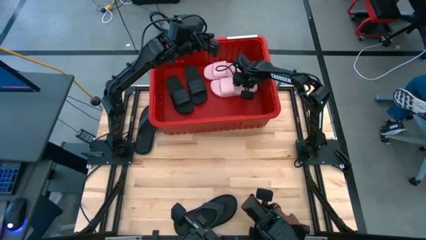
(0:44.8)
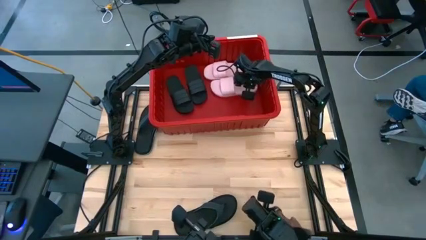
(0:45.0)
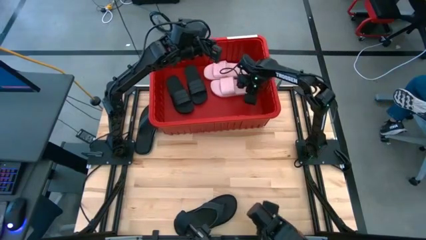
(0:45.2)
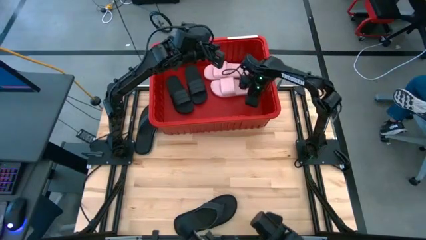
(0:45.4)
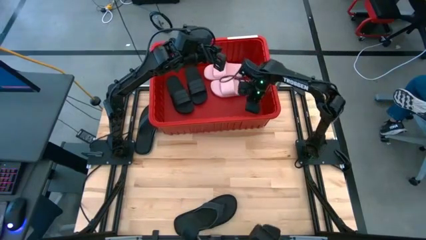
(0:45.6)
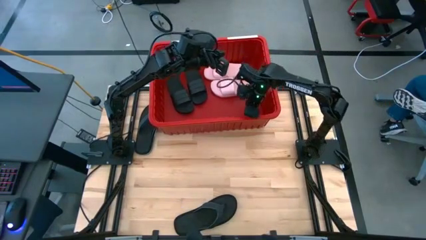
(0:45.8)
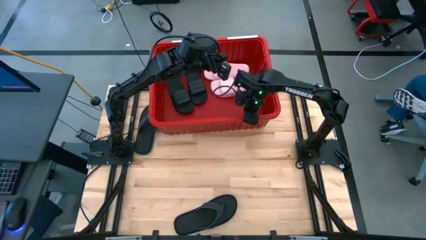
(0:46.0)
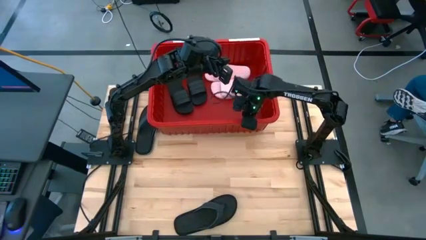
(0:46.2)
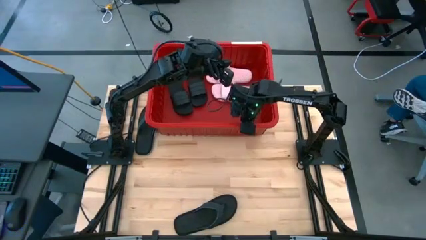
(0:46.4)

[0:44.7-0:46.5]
Task: Pick and place slides into bin
Adjust the red bin

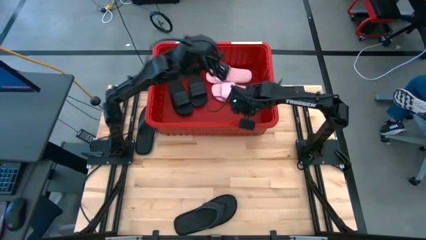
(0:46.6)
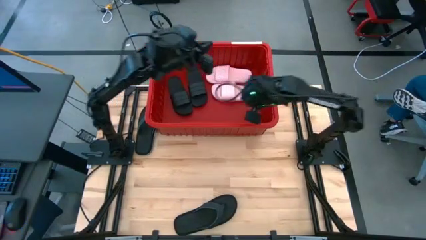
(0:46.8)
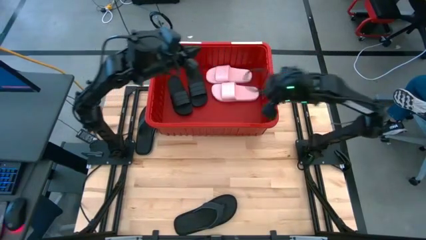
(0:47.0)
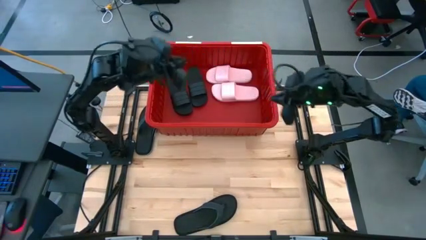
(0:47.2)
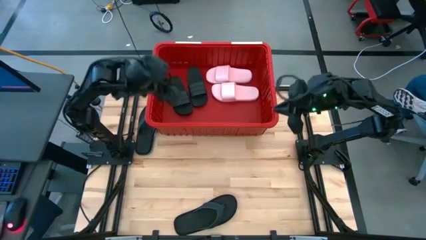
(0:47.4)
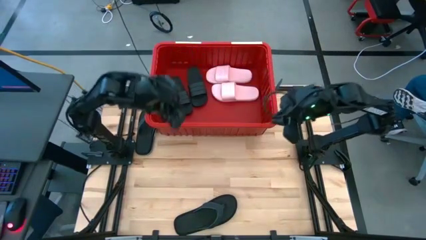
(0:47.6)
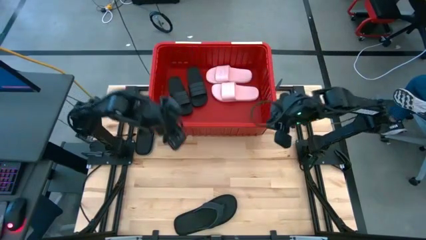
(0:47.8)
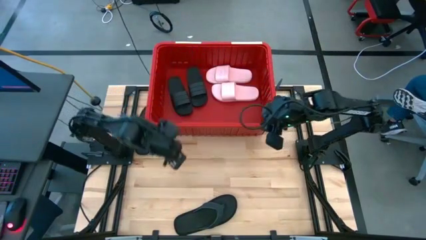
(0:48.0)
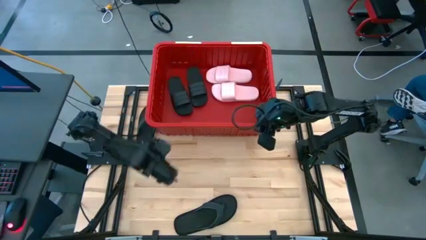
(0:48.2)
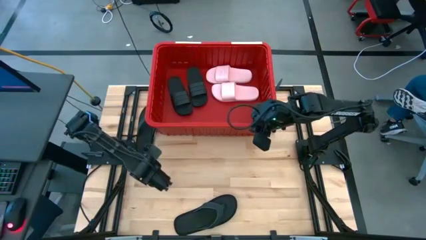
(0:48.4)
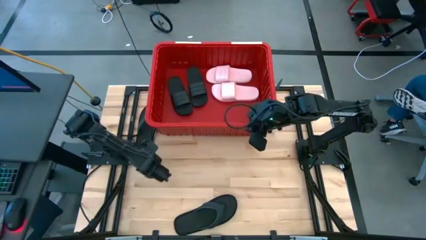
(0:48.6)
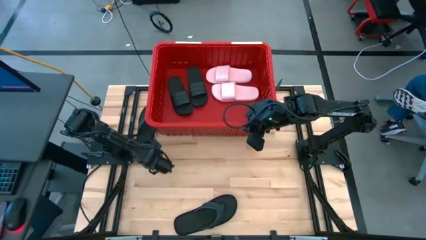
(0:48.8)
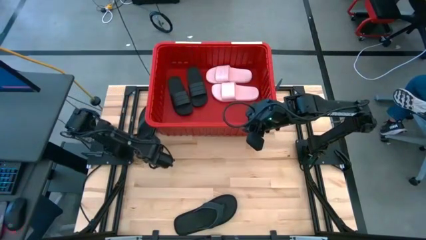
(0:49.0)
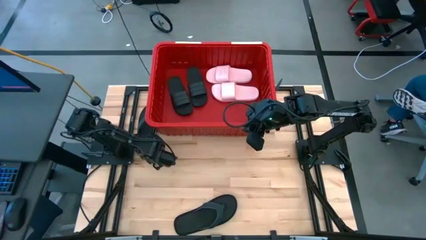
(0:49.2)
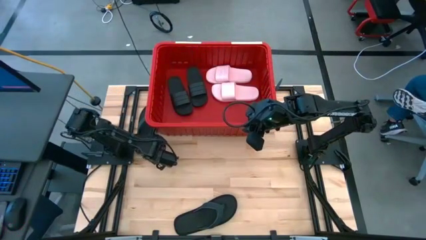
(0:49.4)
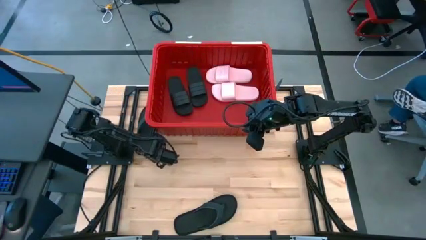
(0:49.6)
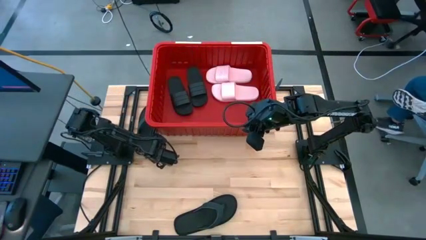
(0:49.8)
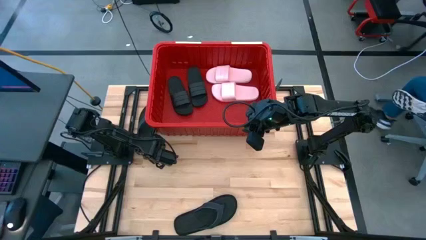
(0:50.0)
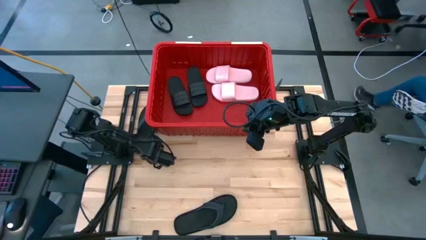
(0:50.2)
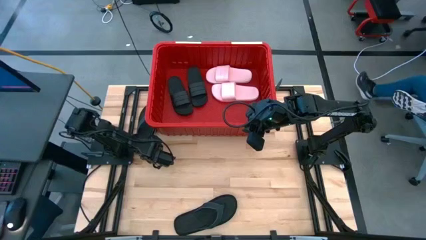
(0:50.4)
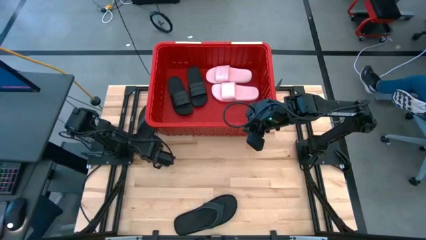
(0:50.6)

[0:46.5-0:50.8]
Put the top black slipper in the red bin

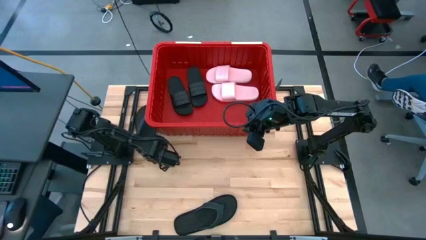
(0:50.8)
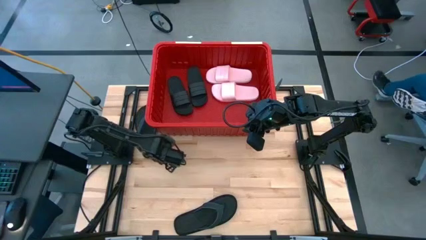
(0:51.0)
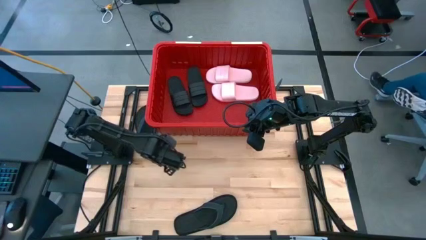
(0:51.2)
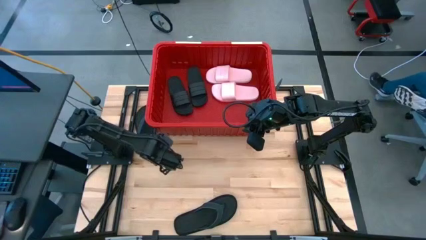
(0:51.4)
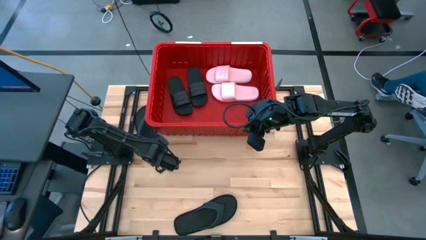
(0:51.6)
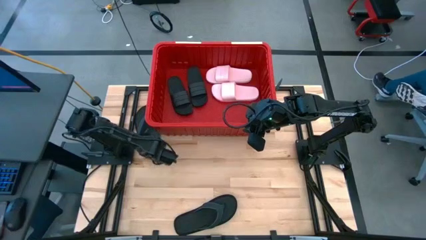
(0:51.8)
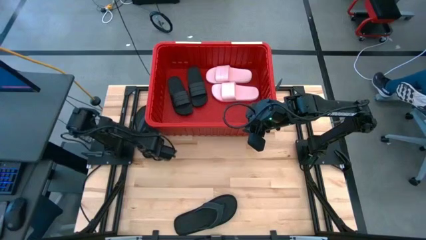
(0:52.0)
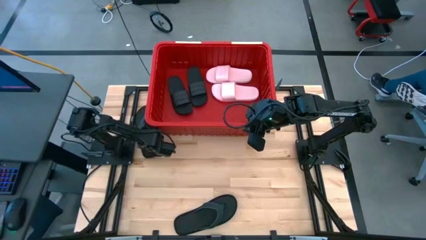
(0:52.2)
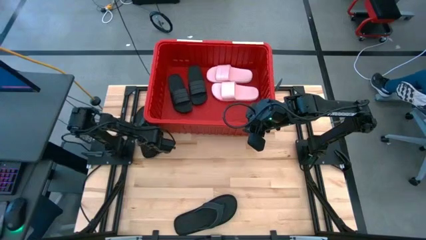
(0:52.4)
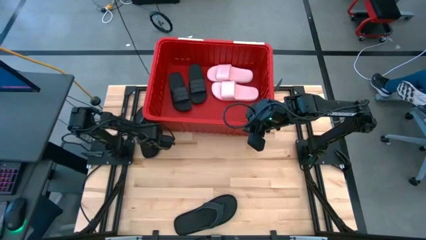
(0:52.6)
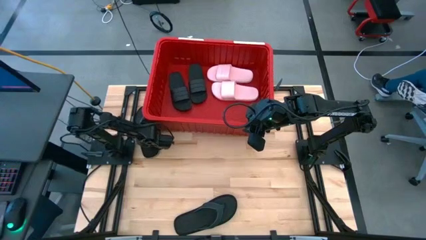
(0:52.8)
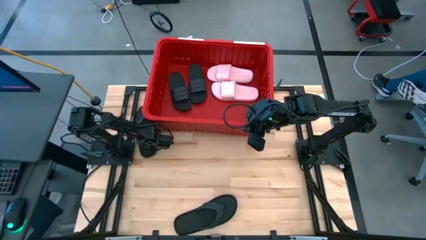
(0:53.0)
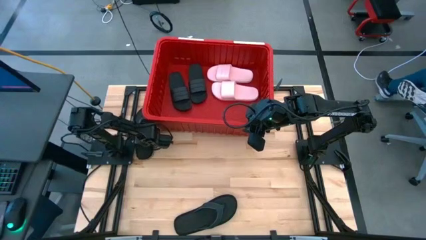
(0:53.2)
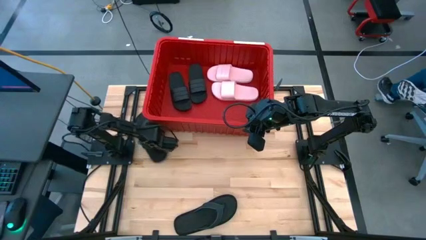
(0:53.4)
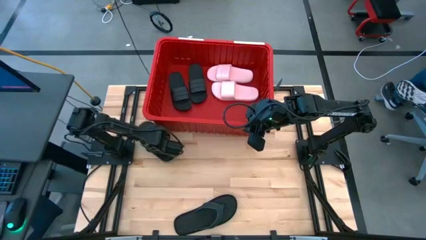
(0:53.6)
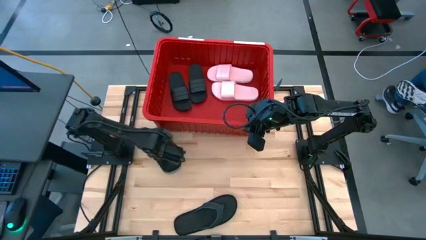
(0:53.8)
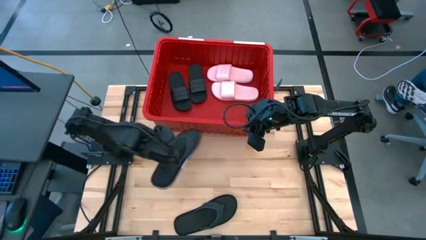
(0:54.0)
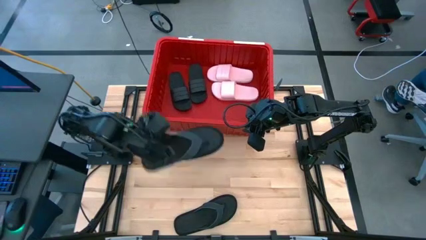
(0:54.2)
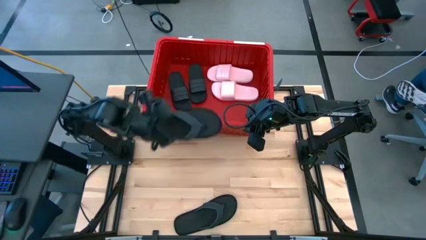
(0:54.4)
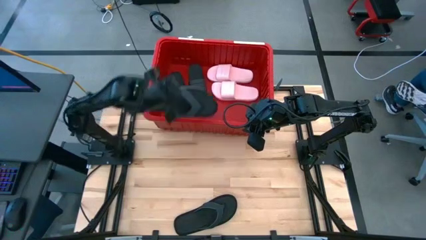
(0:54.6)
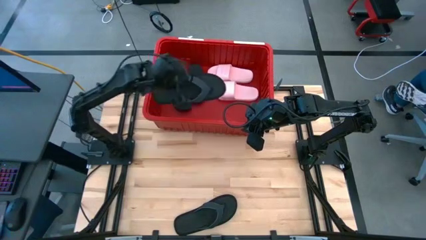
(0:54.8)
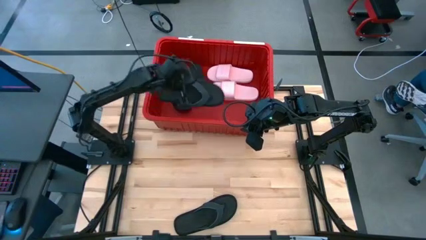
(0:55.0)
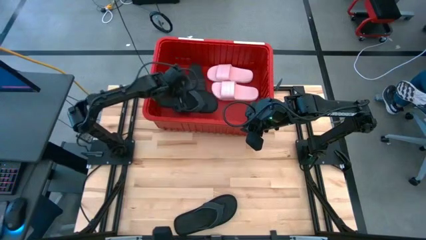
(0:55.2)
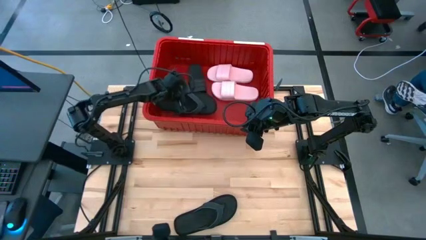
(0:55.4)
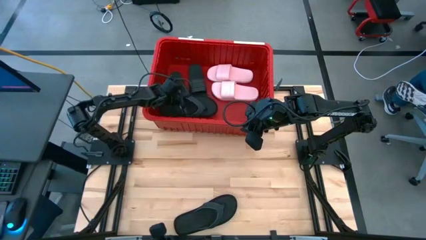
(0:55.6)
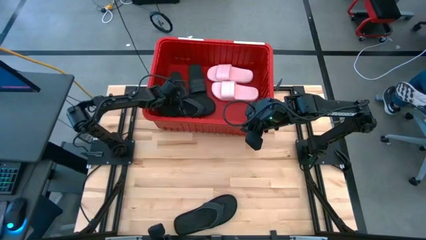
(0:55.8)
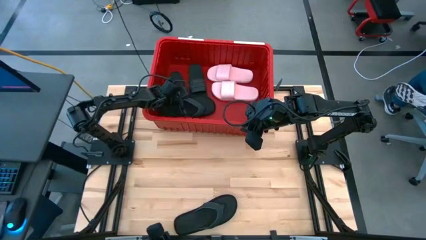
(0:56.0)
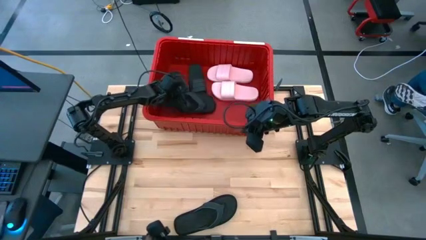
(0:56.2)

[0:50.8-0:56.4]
Put the top black slipper in the red bin

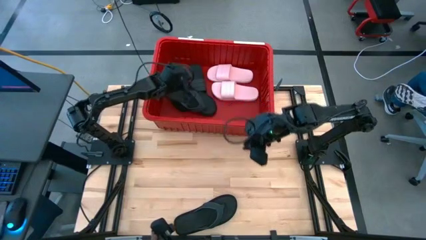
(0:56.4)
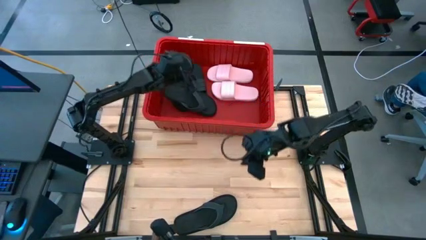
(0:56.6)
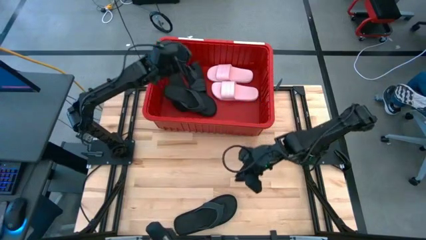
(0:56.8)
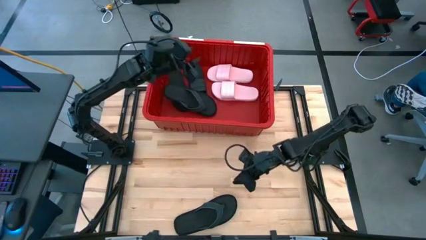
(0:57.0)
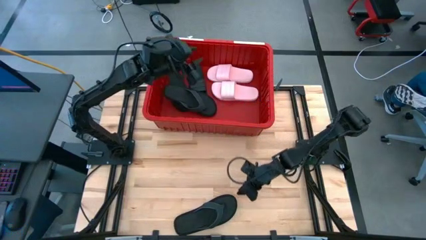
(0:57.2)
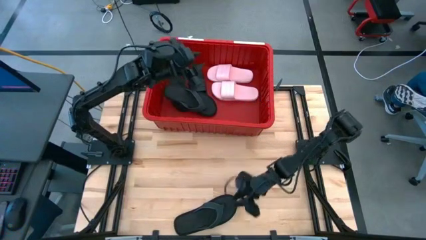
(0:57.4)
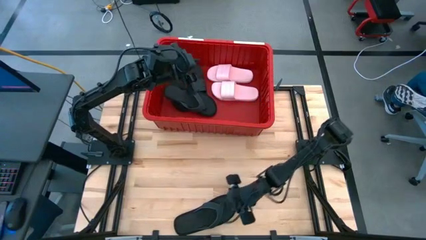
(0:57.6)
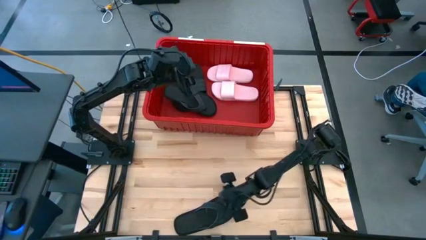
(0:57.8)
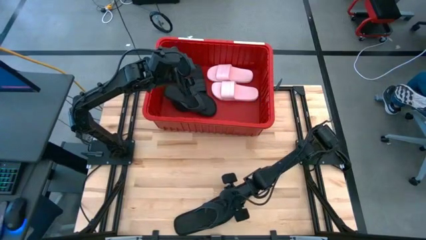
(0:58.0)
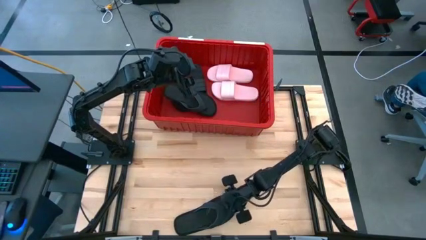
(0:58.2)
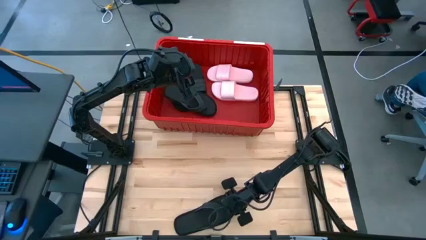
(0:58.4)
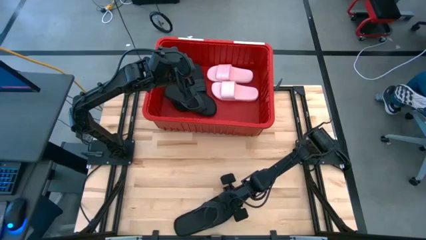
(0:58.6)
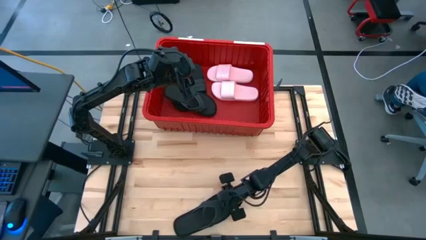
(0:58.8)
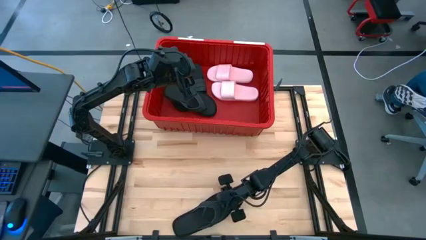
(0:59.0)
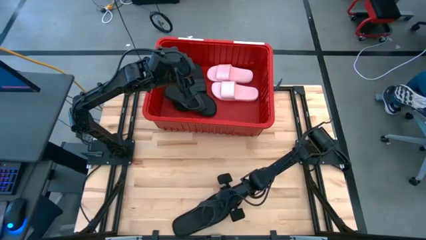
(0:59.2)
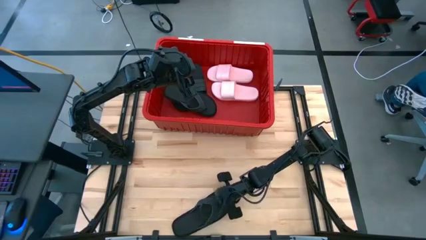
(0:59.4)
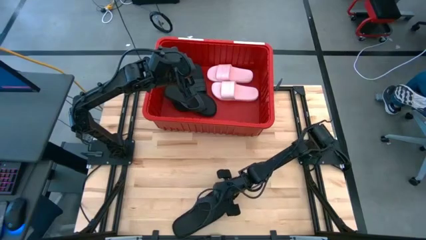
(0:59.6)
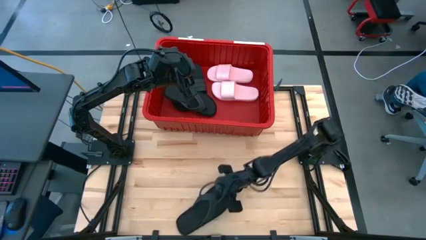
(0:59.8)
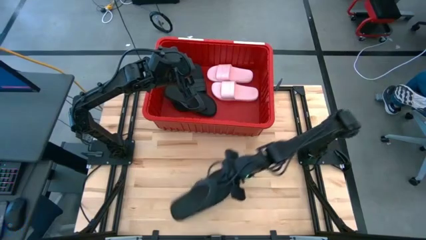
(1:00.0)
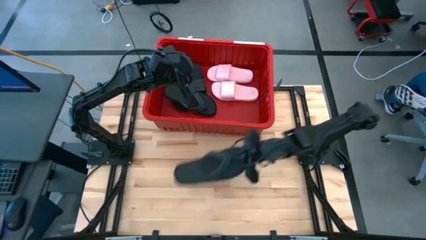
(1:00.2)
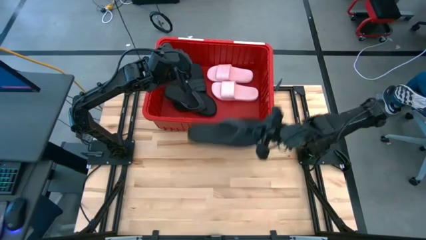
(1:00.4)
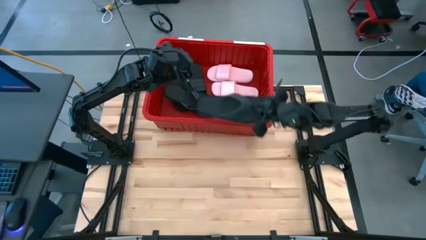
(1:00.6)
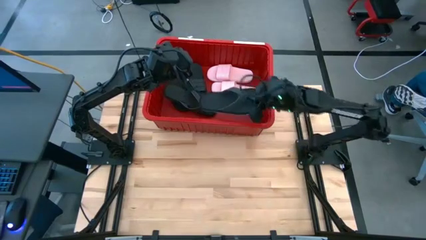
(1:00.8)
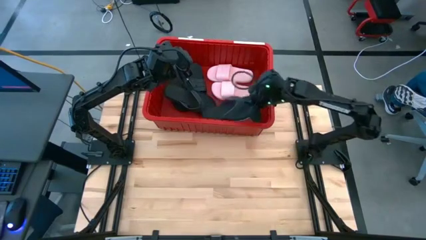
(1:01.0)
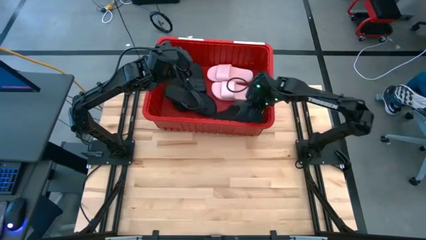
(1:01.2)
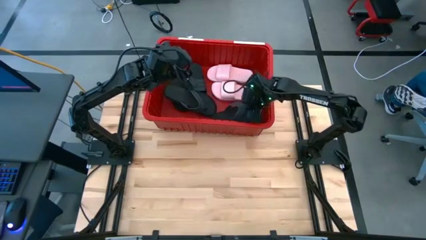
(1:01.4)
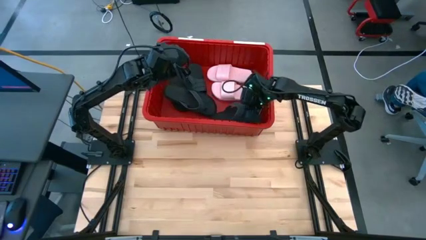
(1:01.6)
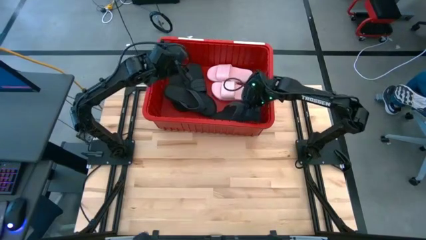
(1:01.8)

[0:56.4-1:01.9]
Put the black slipper in the red bin
